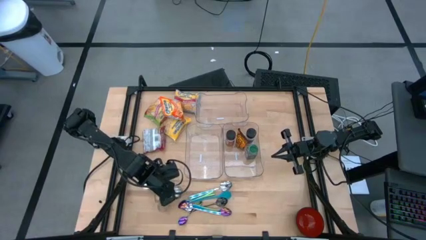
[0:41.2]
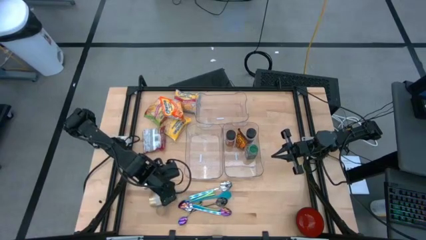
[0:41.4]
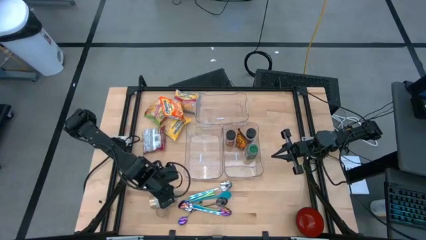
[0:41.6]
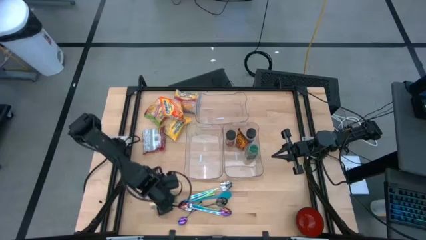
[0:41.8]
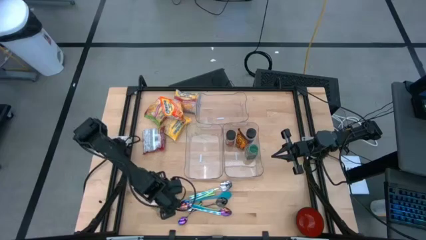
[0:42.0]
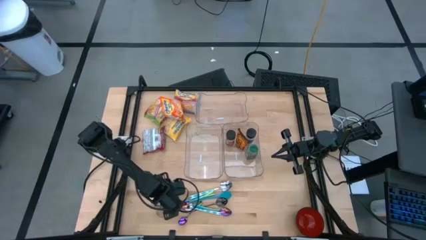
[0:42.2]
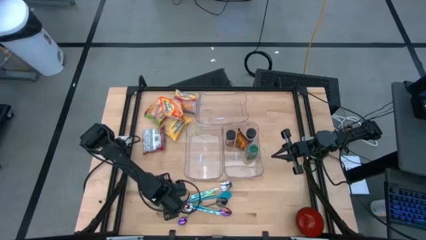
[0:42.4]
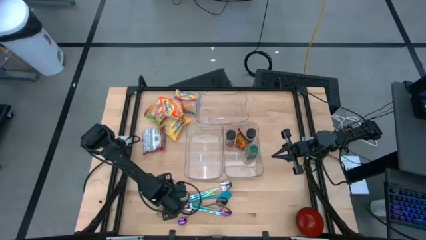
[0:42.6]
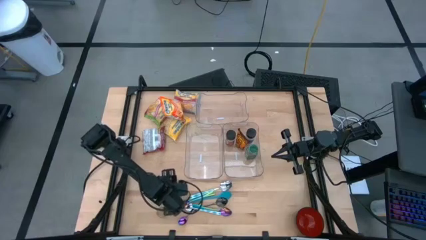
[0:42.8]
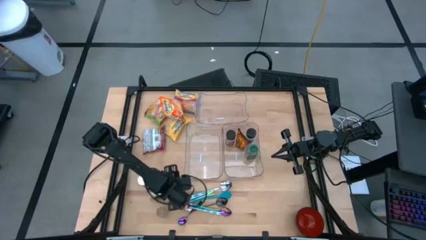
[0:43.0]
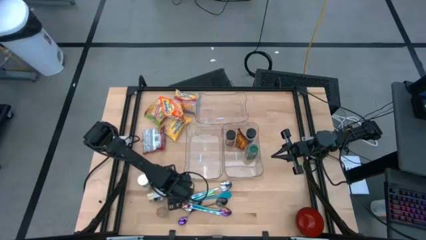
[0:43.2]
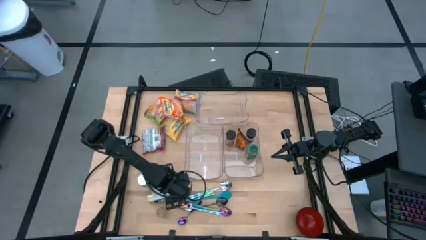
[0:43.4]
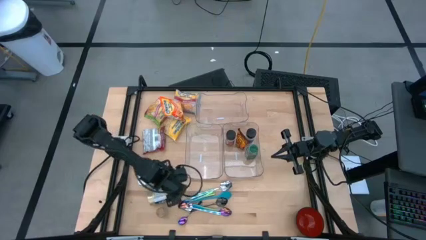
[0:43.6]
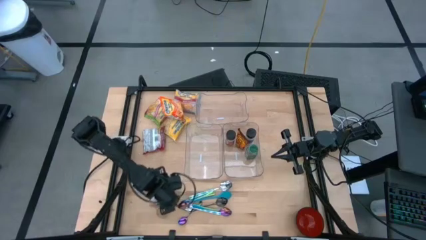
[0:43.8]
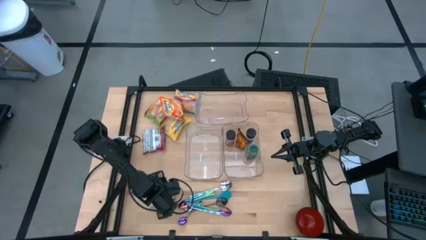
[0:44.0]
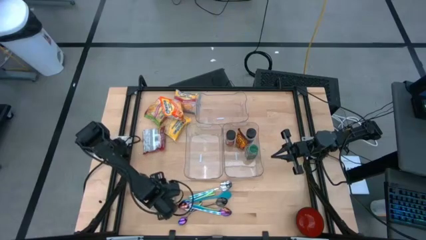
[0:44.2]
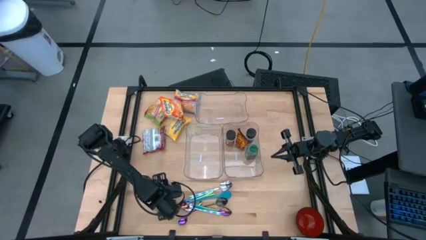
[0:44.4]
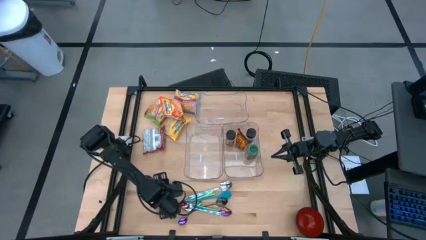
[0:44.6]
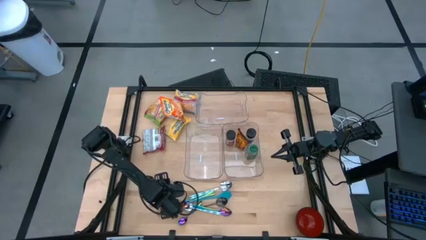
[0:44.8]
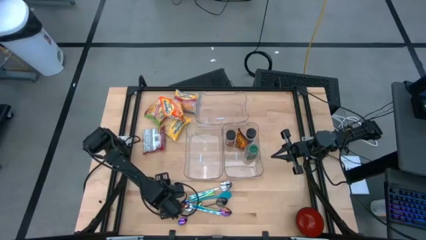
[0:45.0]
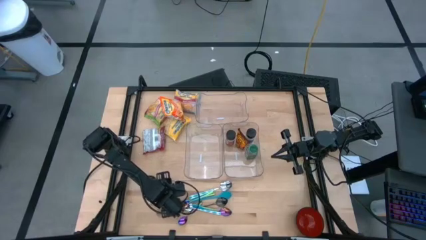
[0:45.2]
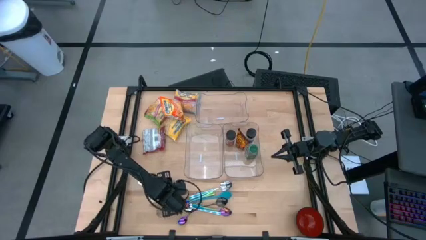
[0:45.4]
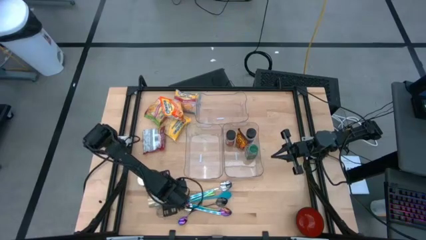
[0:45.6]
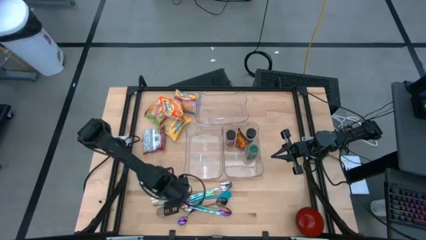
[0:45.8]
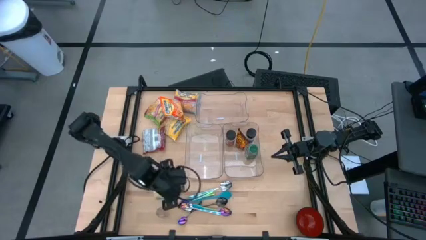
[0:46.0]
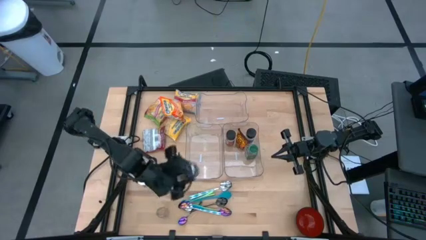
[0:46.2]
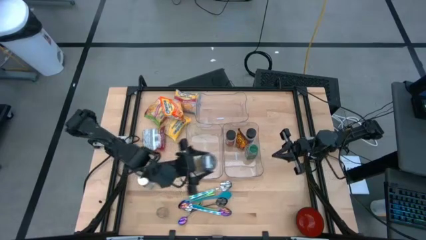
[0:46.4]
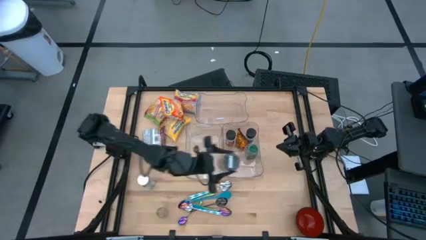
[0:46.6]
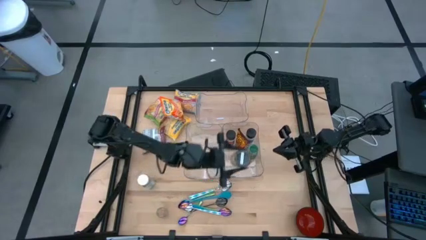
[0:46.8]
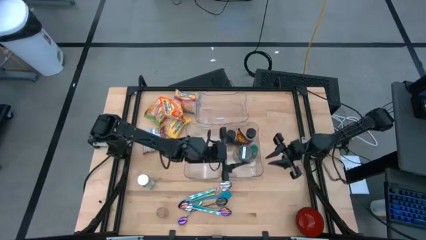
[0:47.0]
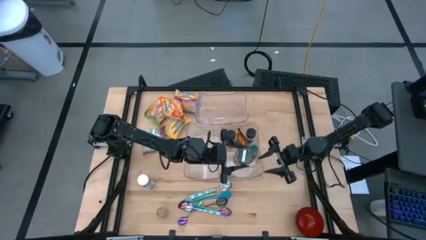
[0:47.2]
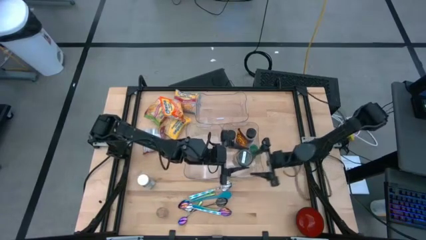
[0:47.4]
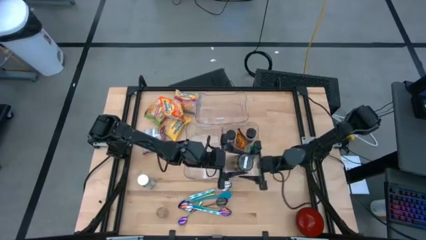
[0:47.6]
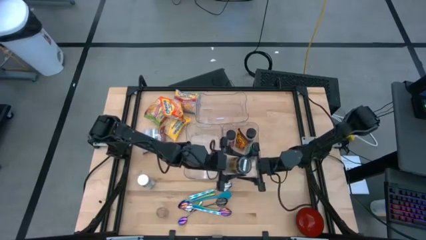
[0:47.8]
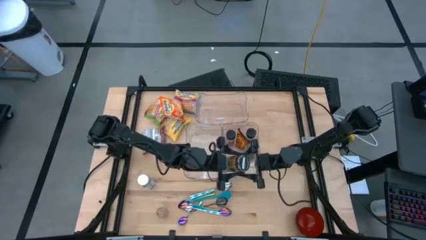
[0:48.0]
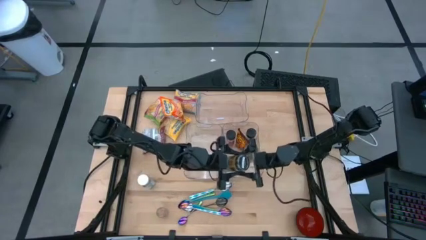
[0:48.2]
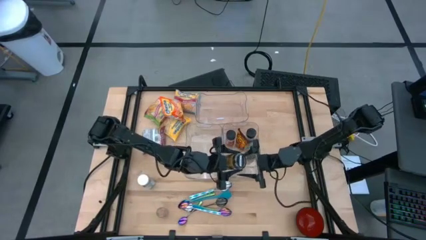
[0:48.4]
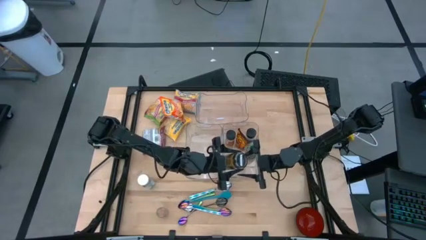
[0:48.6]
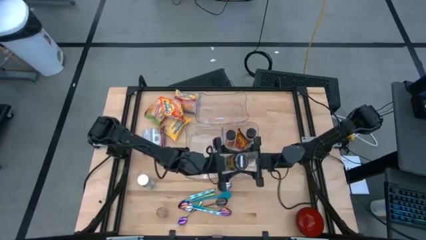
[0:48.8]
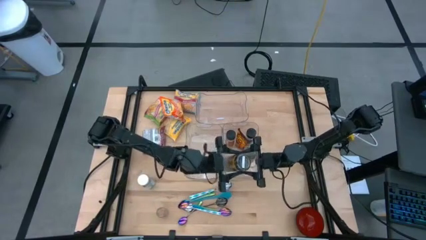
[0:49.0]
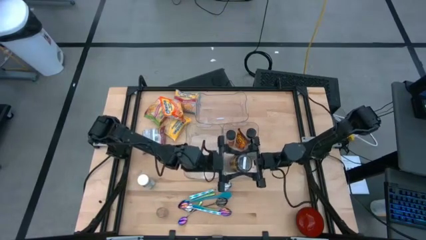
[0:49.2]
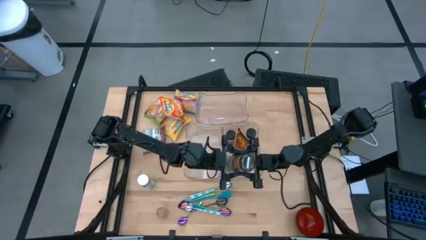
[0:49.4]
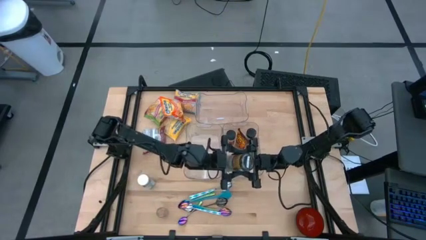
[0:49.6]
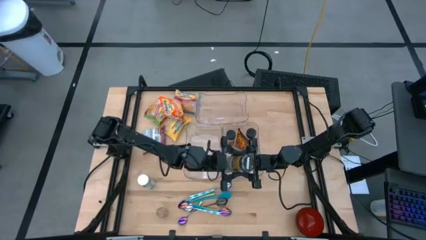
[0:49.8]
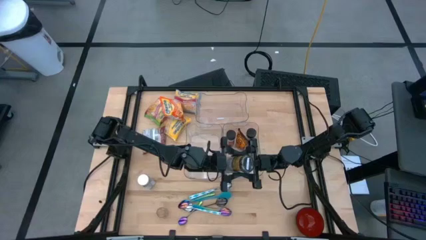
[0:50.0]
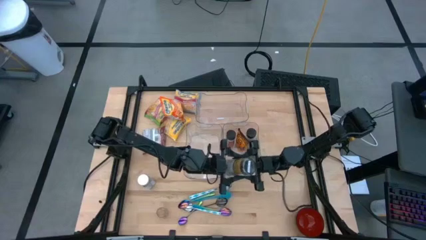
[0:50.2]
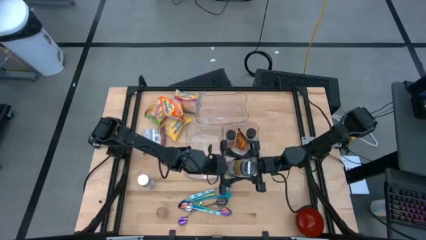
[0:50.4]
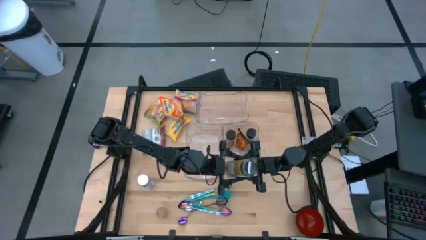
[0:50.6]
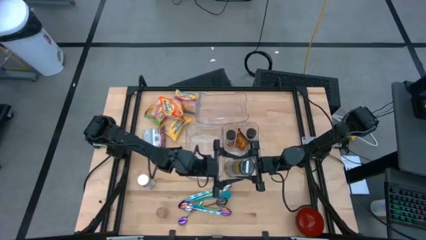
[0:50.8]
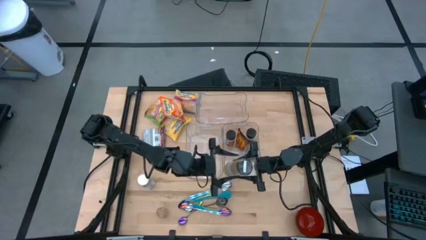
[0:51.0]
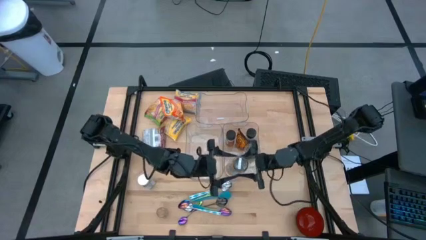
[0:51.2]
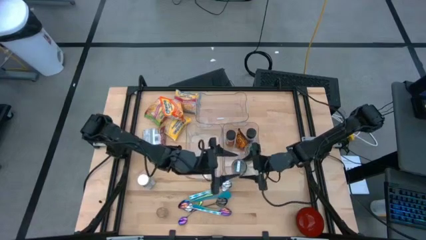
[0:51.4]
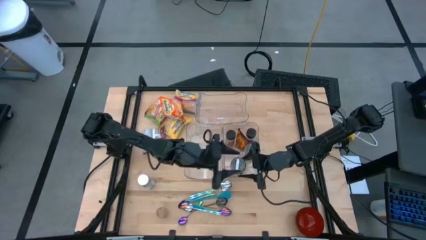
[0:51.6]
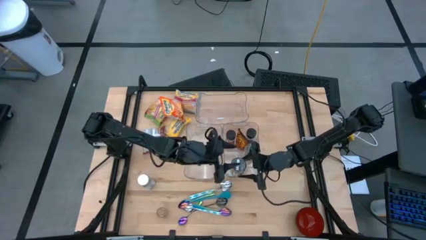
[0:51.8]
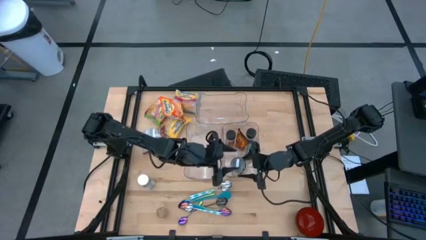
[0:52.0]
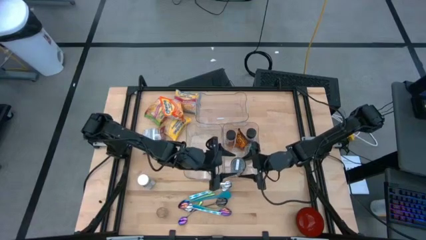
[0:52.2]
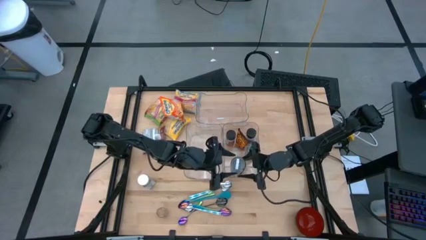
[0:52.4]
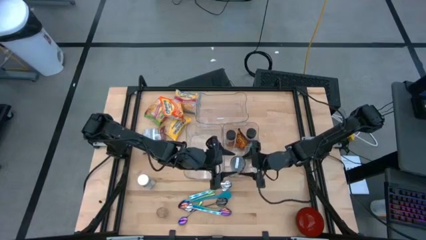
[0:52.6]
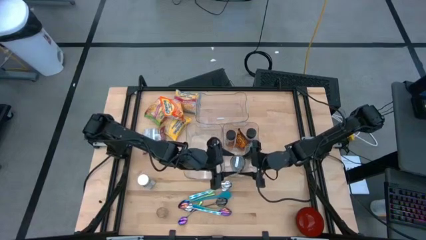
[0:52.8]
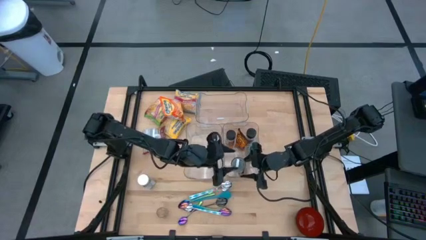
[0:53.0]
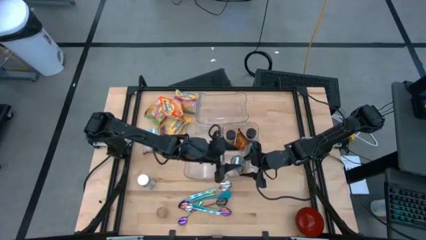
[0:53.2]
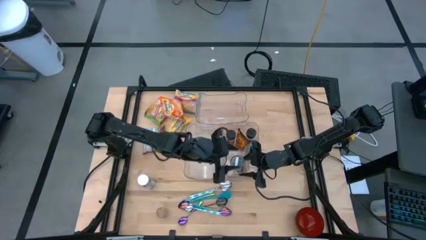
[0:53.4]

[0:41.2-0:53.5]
Task: Pick & Place Food Item
Put the gold seasoning bottle into the bottom right transparent bin

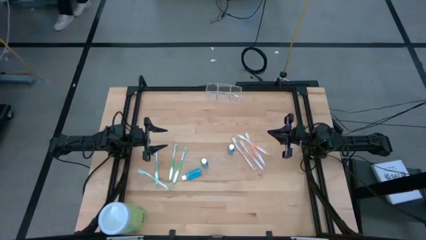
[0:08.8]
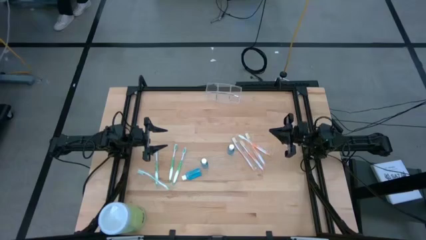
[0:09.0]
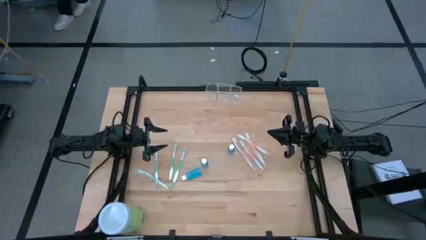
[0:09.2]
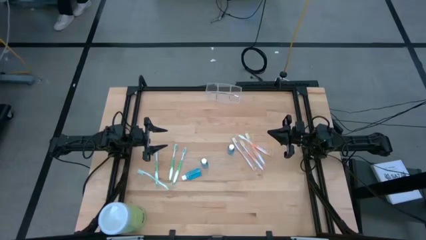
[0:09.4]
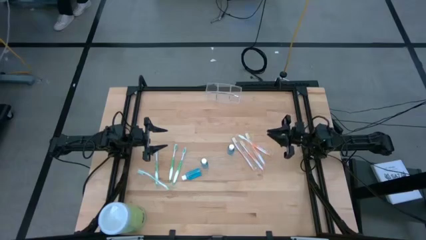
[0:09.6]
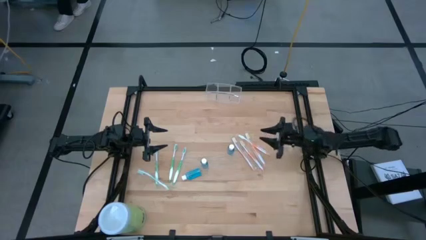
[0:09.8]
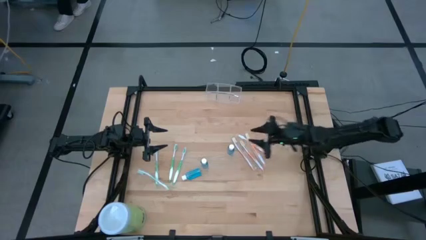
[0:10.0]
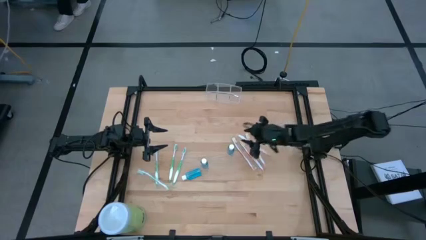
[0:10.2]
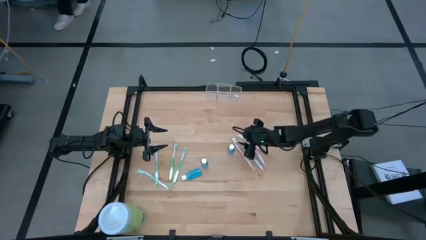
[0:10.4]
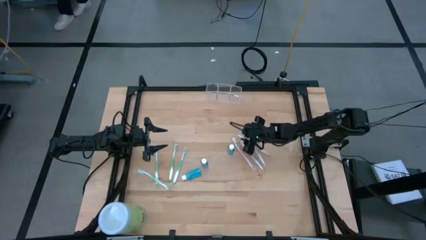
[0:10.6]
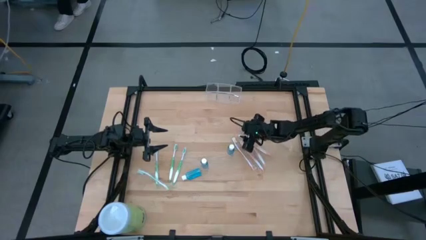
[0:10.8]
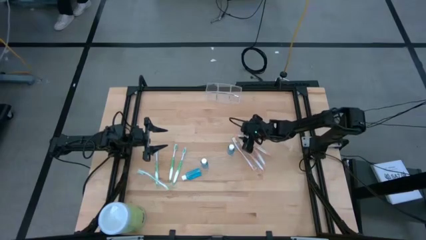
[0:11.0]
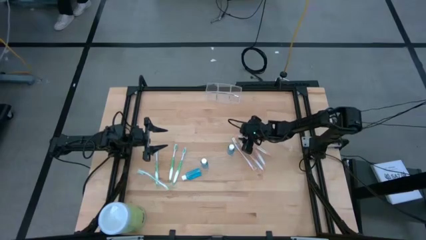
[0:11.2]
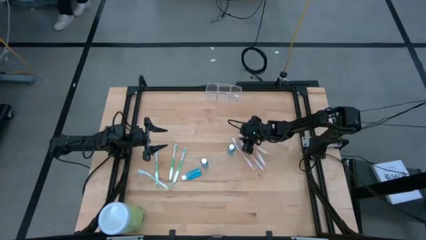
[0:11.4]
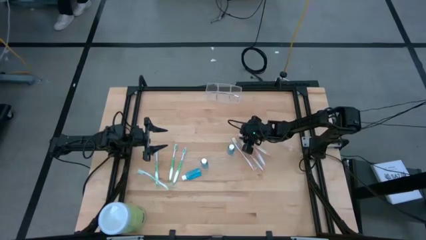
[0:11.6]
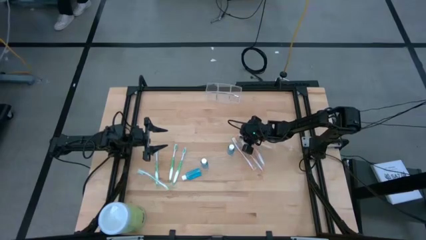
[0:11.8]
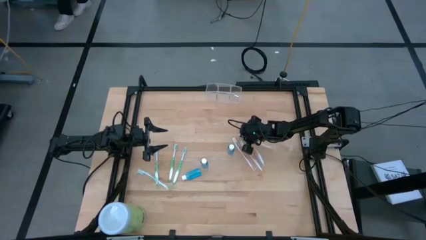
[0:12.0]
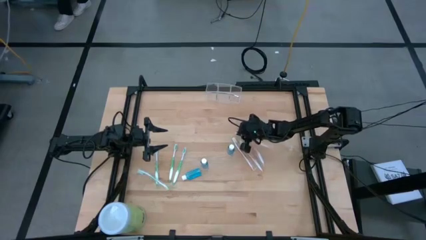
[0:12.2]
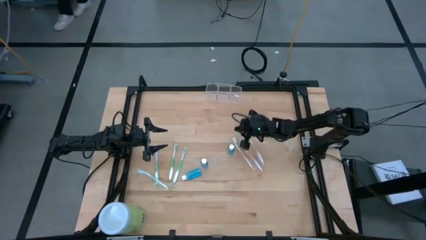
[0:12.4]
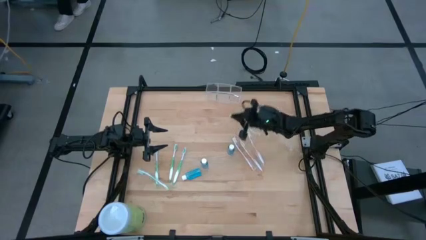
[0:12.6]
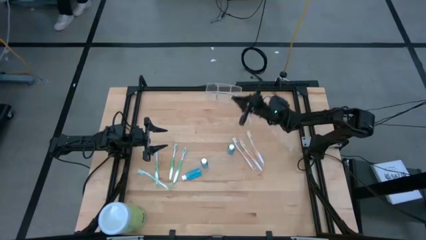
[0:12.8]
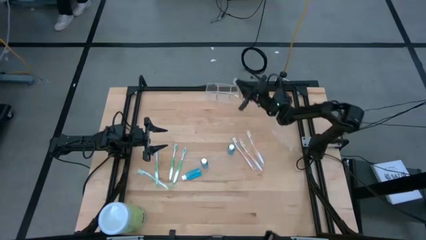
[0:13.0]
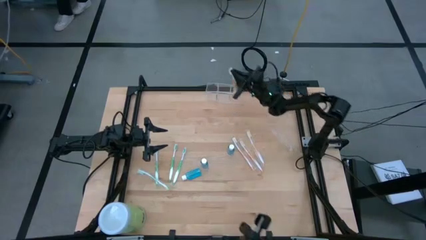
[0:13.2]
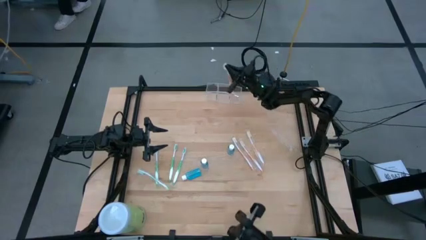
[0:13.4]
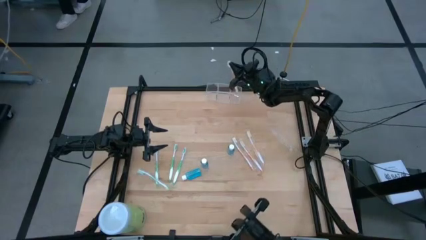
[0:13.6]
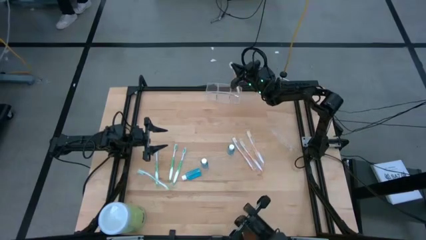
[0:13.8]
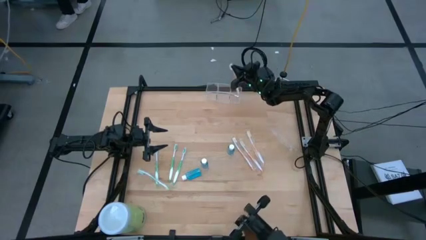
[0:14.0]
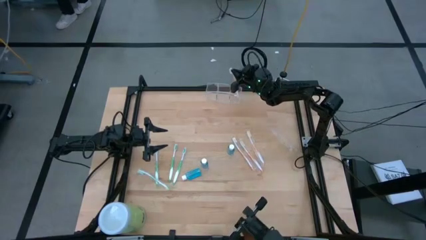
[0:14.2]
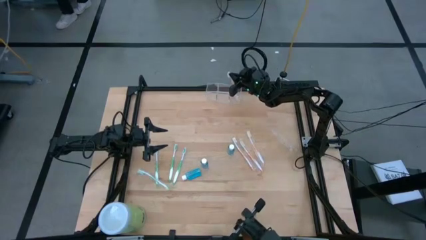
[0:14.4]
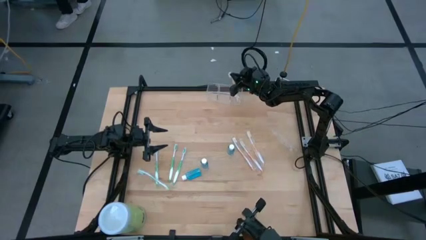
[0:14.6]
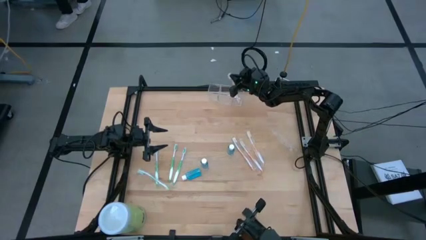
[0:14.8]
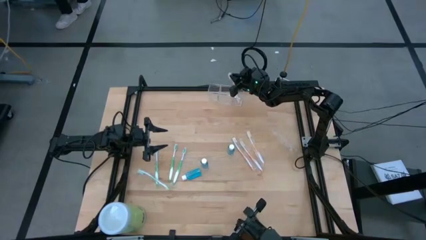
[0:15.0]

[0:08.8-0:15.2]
Task: Pick & Place toothbrushing station
Put the orange toothbrush into the transparent organizer
